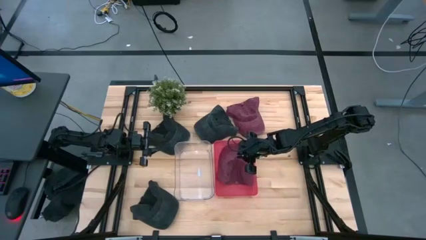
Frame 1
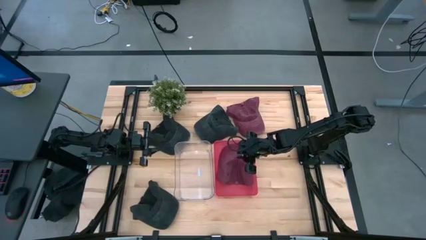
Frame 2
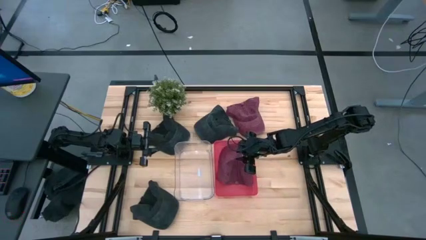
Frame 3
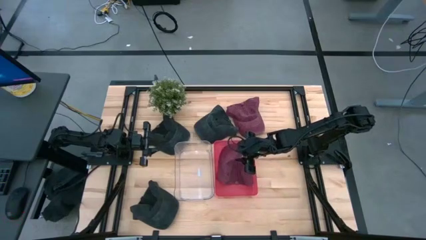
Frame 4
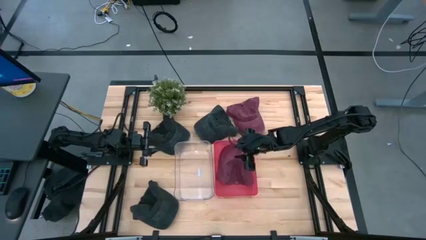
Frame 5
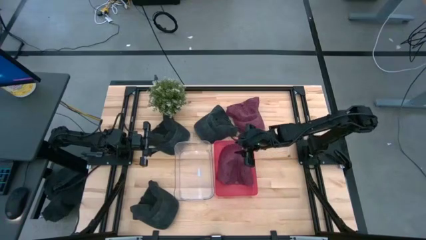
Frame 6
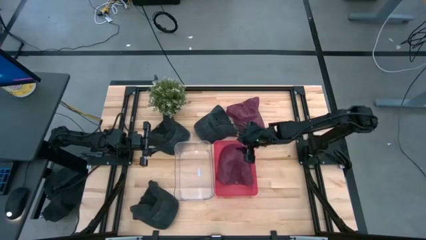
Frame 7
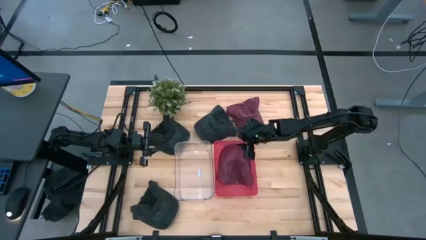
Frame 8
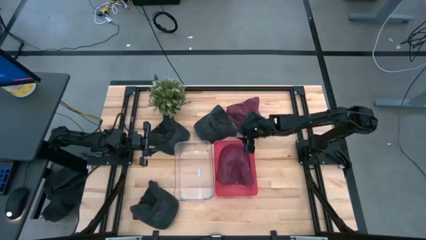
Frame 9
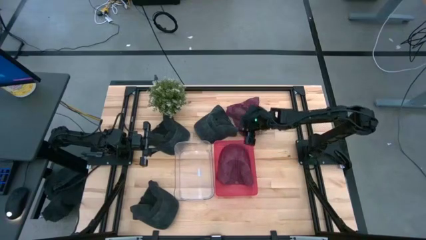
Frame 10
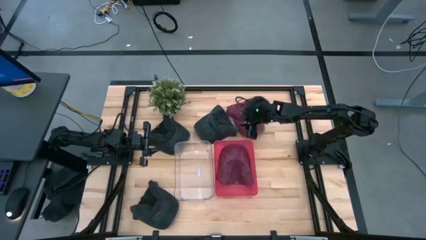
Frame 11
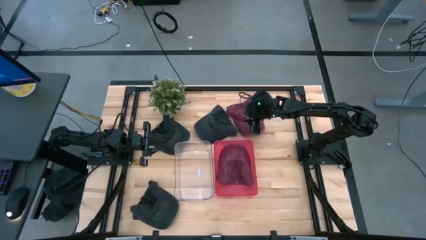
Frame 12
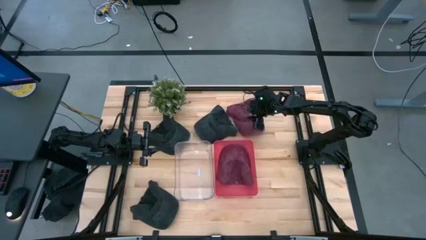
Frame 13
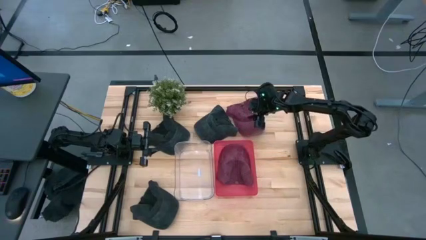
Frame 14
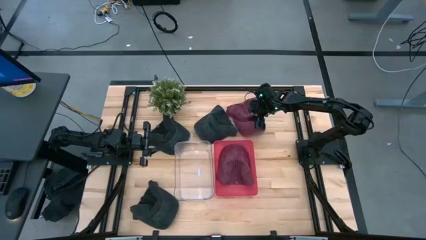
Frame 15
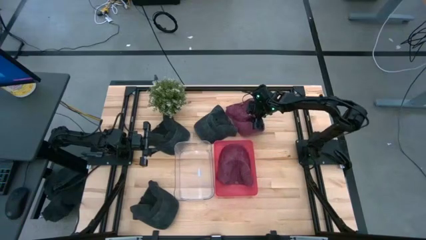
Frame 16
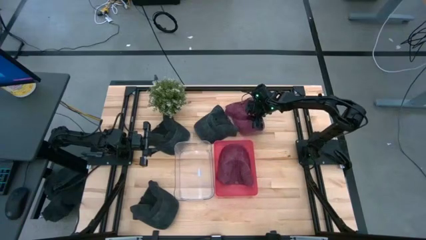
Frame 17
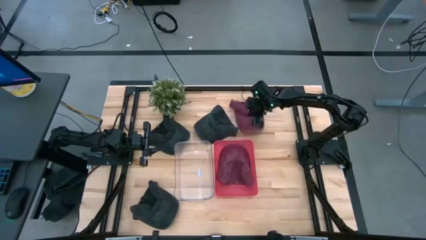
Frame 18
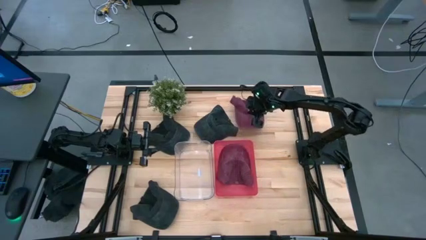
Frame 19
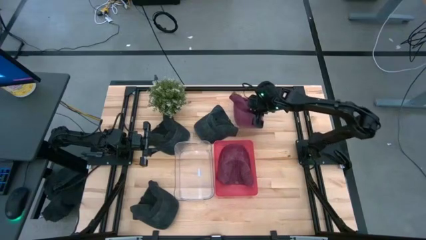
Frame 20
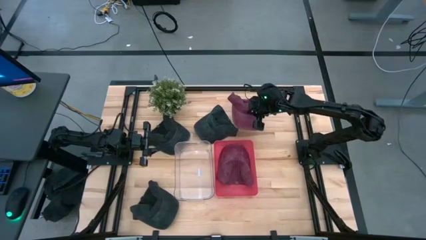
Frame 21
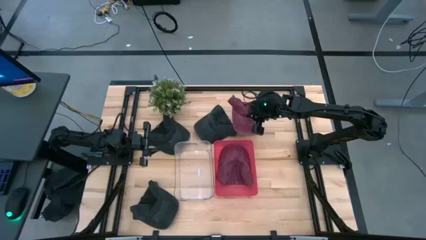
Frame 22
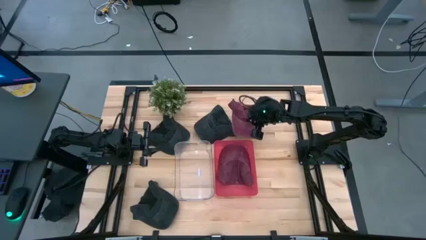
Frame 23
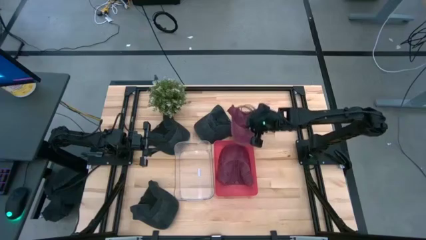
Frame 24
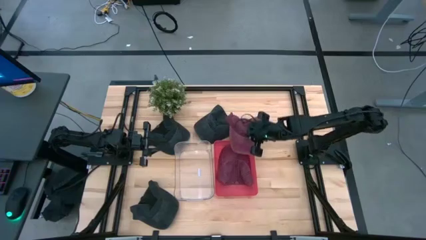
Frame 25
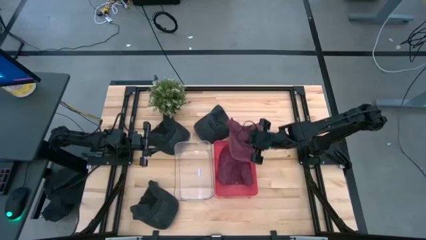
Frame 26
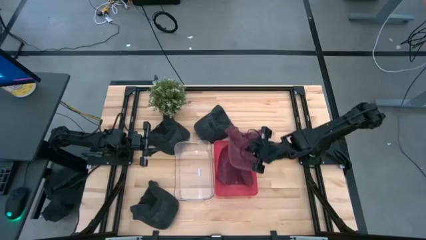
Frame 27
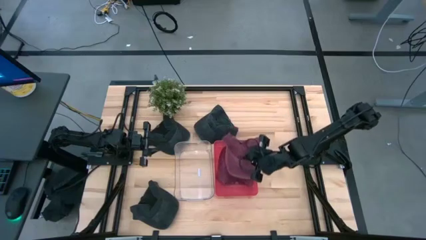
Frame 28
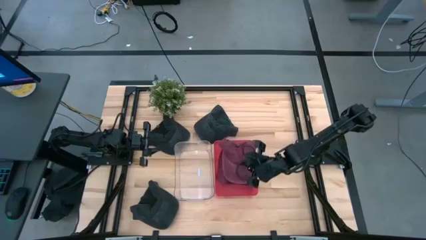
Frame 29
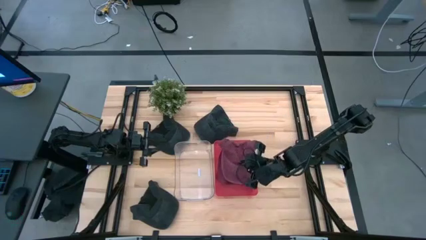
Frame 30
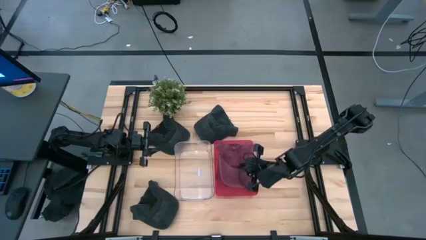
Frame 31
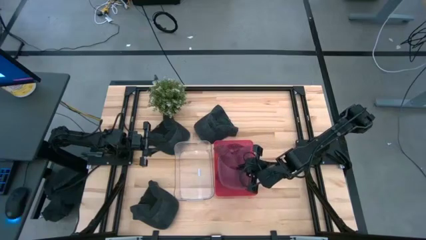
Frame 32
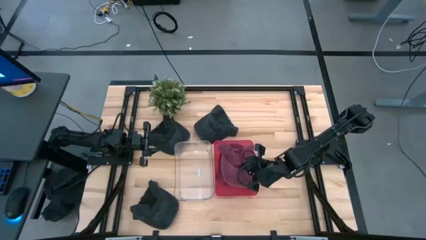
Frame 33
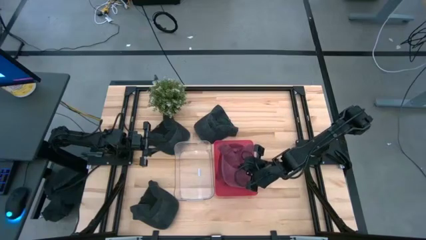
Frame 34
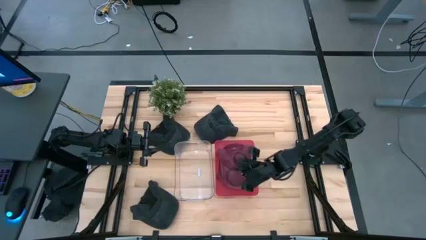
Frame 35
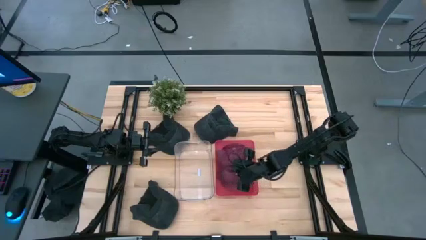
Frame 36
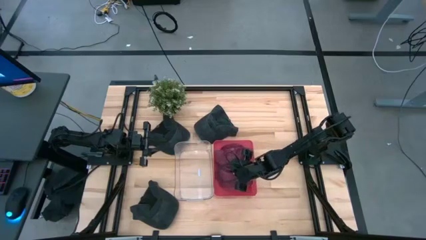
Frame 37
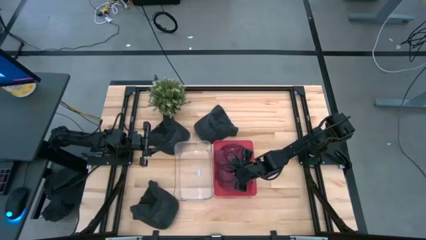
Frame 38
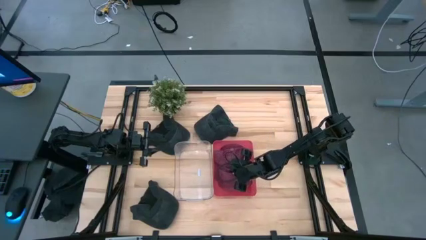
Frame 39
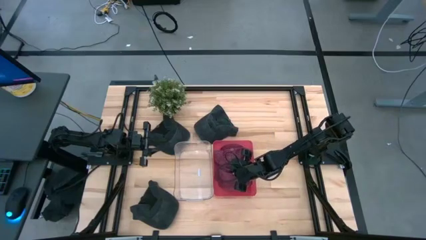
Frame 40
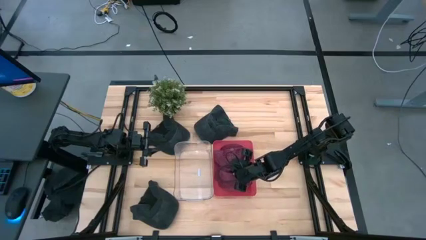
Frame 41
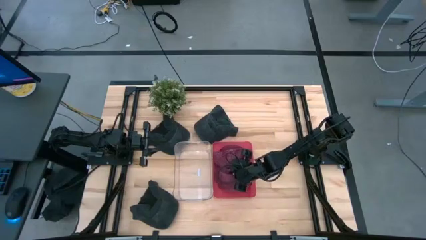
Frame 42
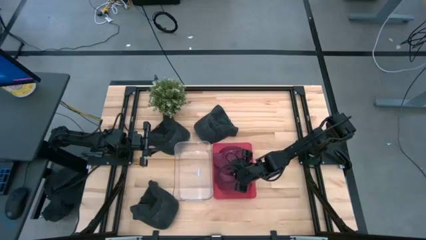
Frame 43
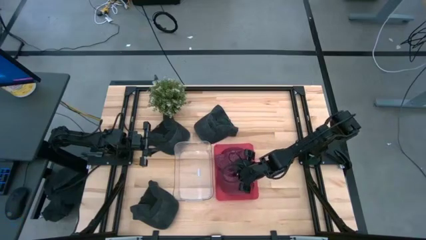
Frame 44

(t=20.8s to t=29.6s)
Task: Pick & Place hat
Put the red cap into the red bin
